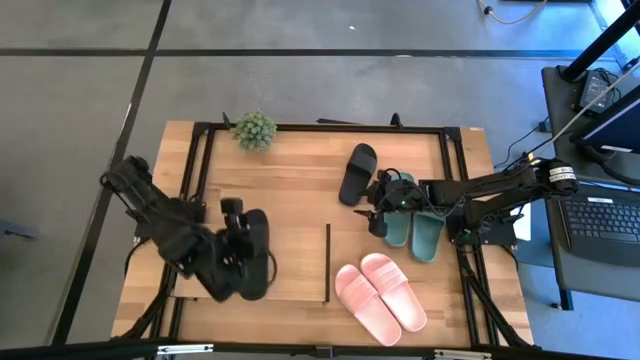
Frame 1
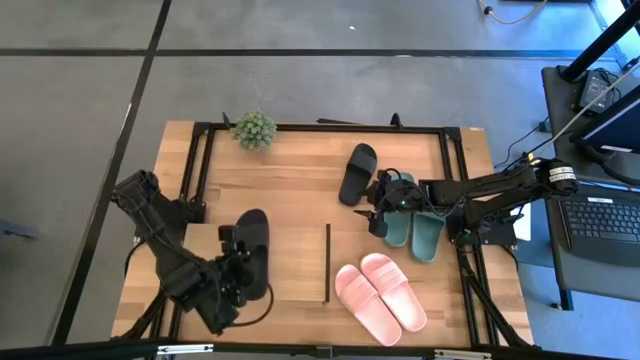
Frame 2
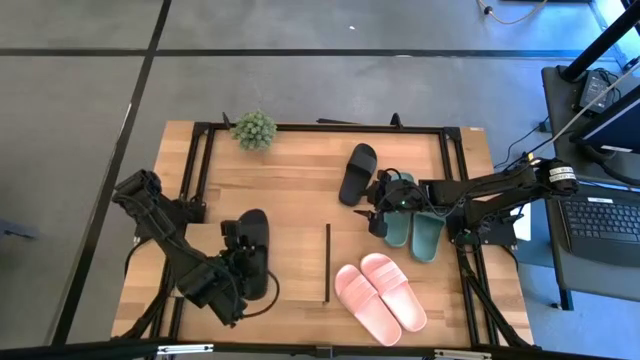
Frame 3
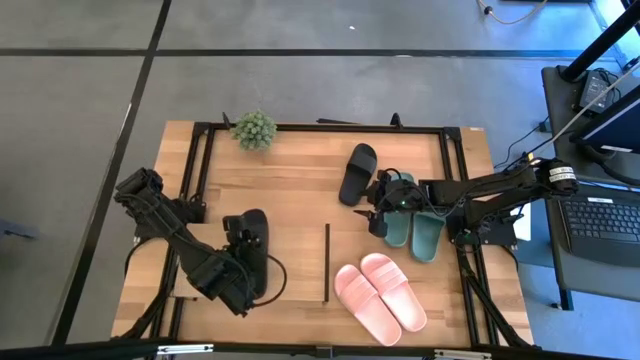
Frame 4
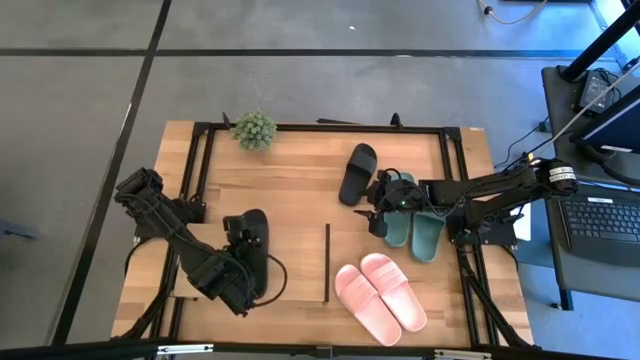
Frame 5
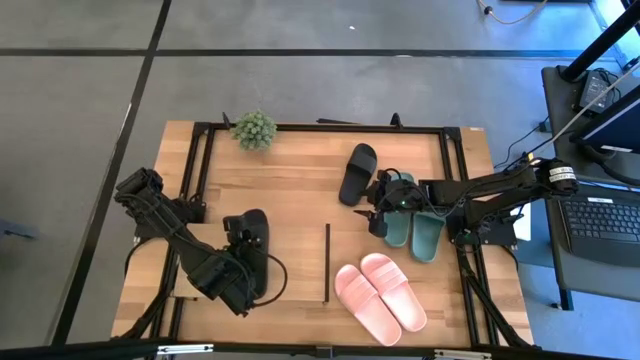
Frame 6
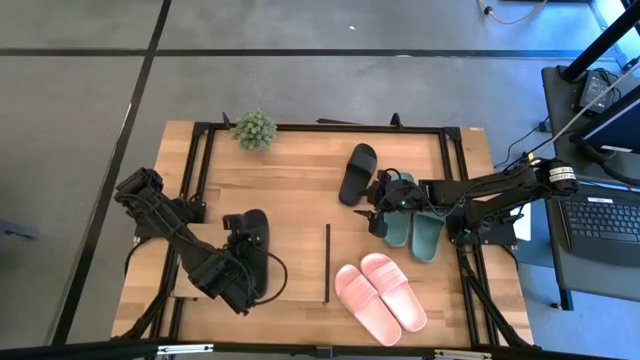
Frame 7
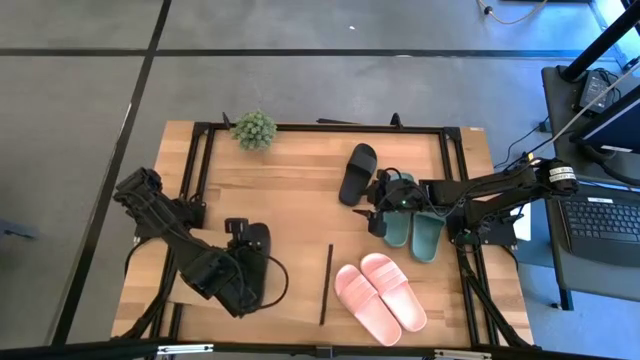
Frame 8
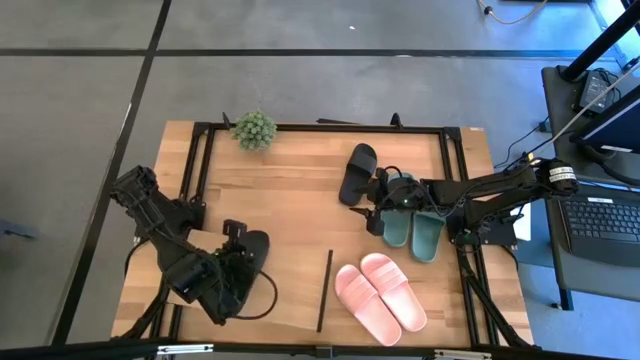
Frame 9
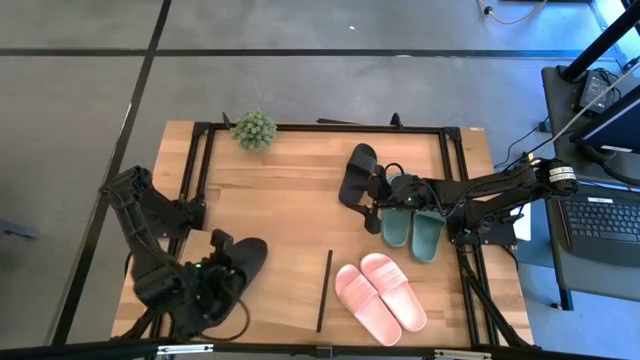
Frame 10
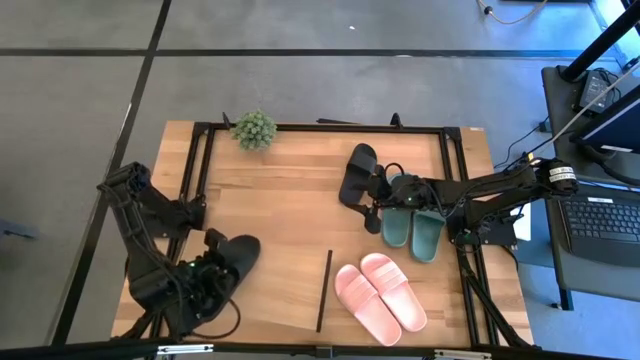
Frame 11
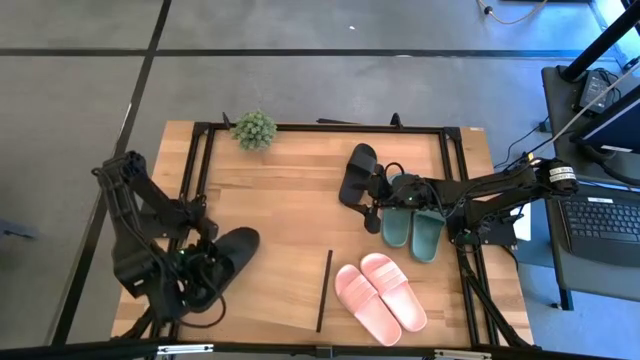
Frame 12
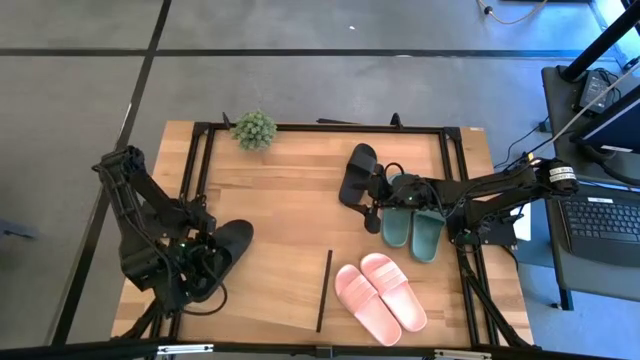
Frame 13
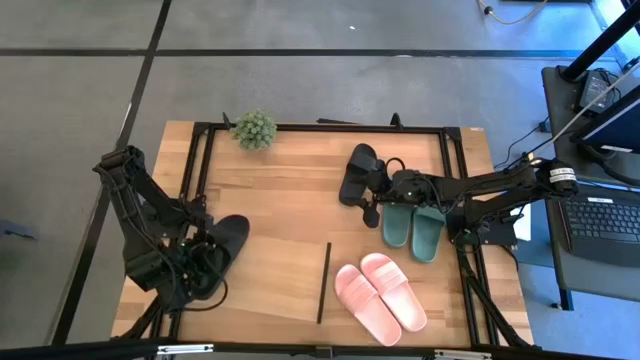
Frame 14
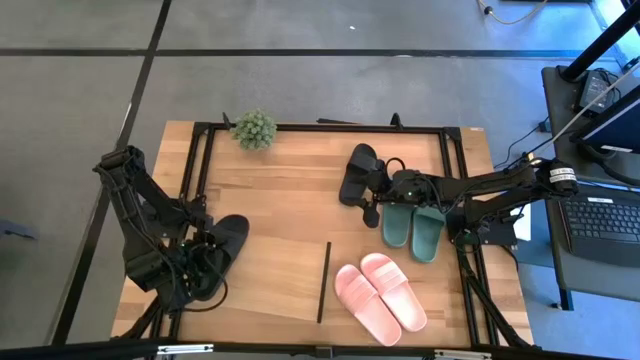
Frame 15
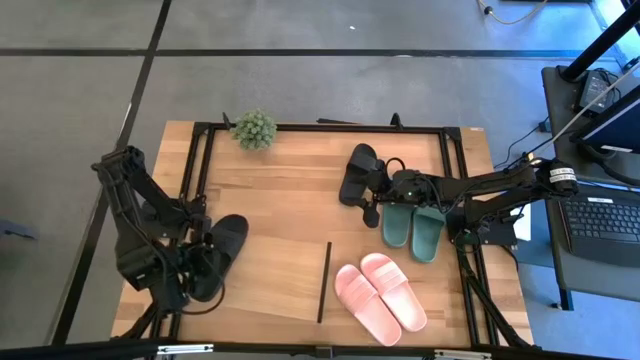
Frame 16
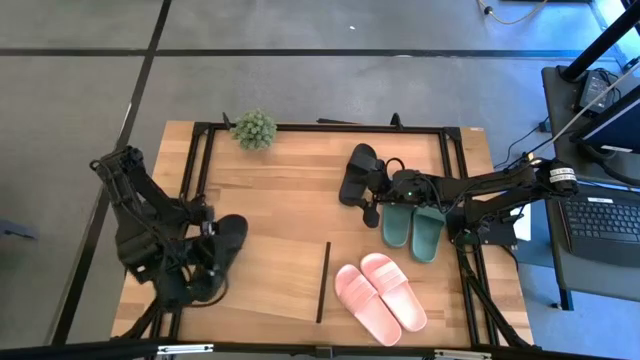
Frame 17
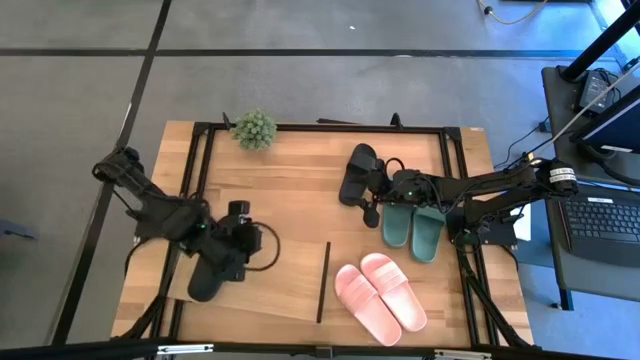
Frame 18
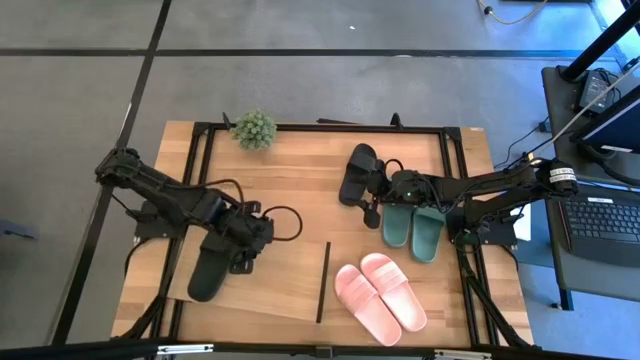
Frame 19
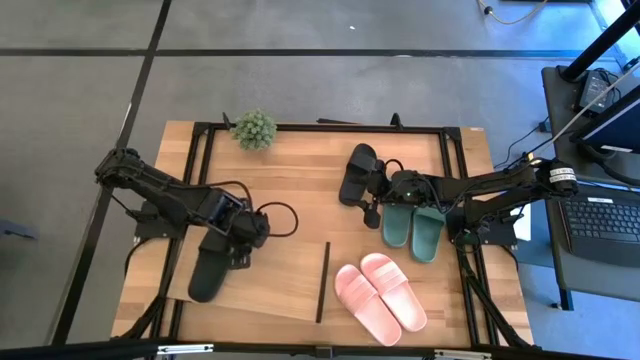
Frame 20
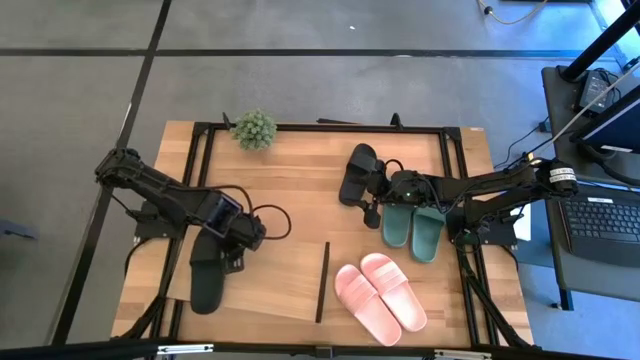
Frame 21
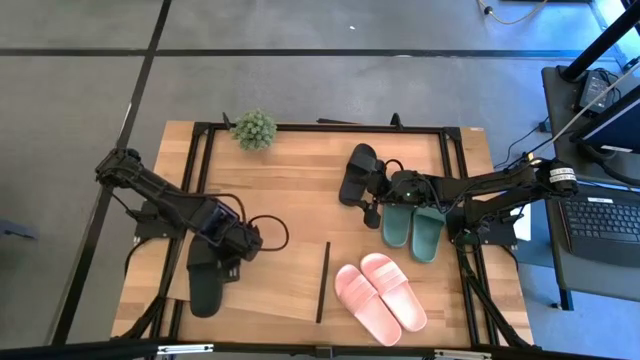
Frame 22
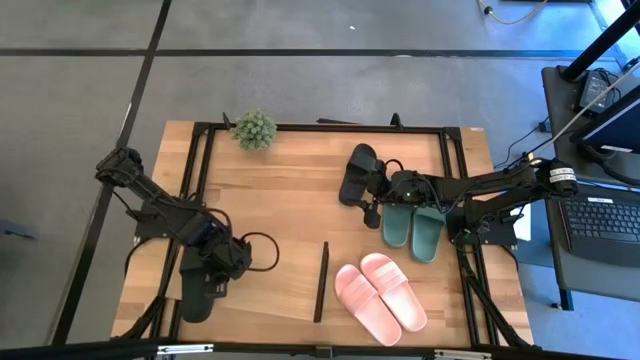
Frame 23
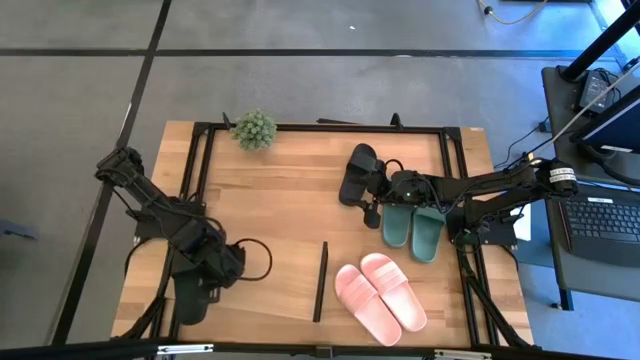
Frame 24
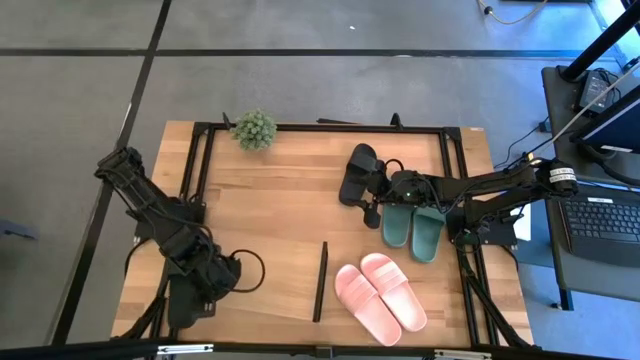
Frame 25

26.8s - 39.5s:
Task: Pick and place slides into the shelf
Put the left black slipper on the shelf

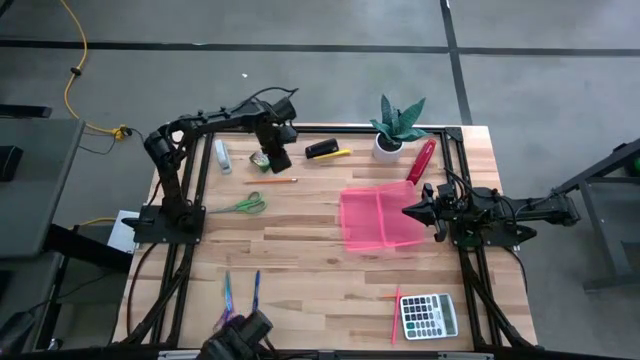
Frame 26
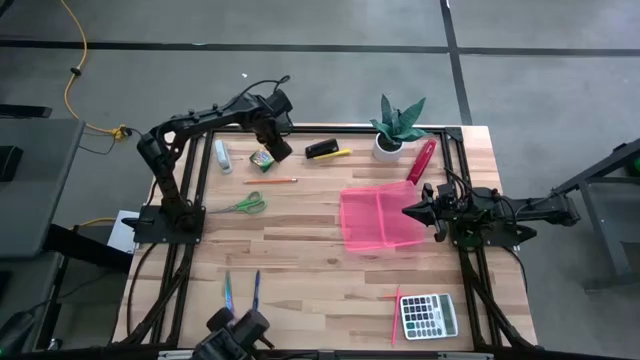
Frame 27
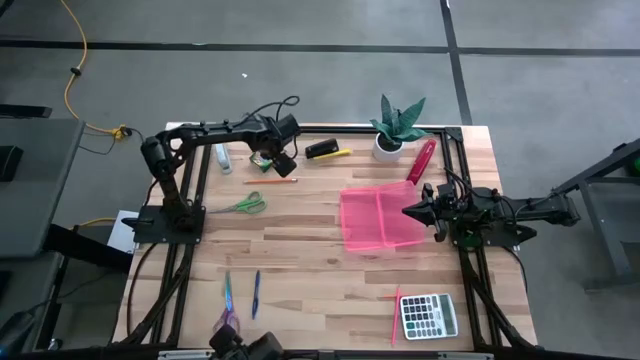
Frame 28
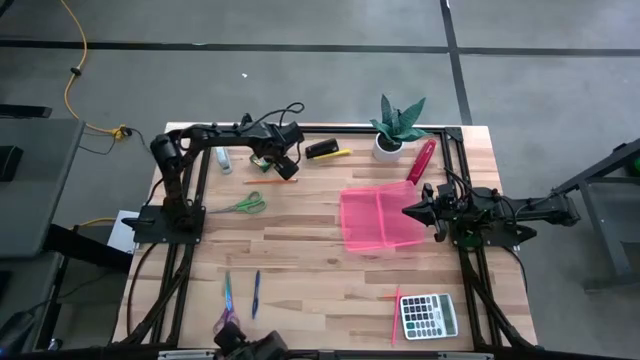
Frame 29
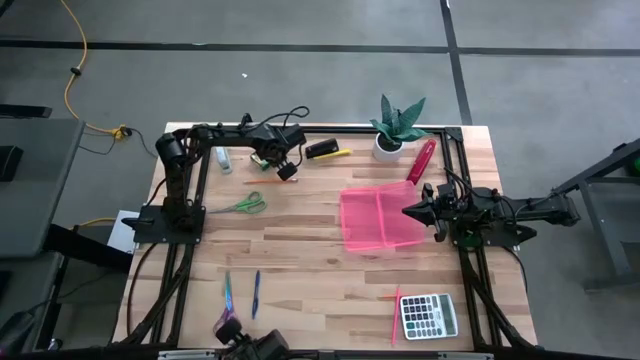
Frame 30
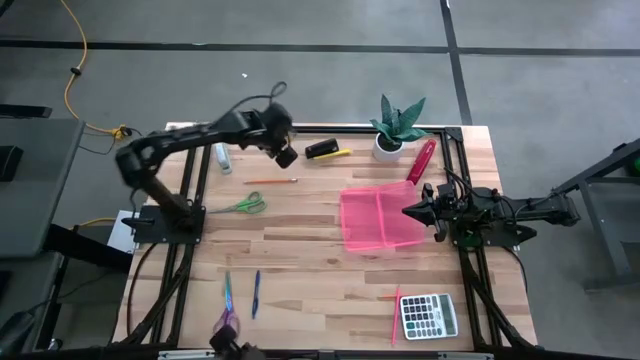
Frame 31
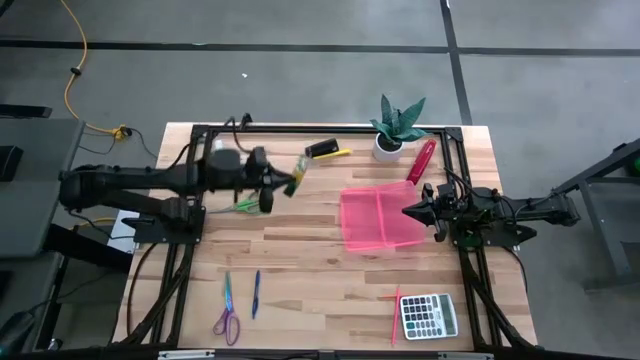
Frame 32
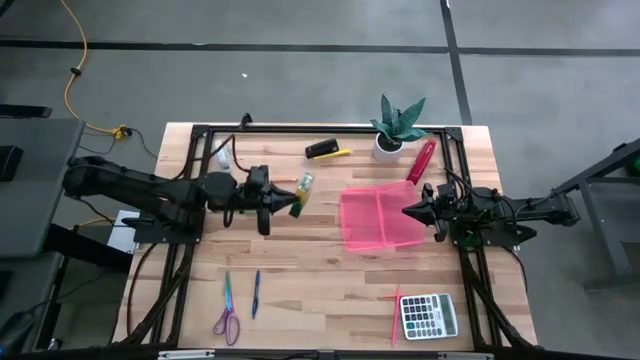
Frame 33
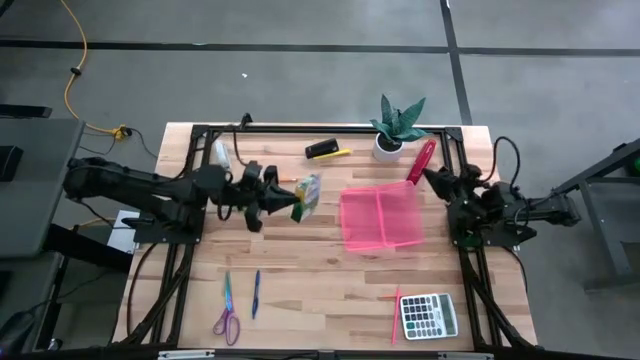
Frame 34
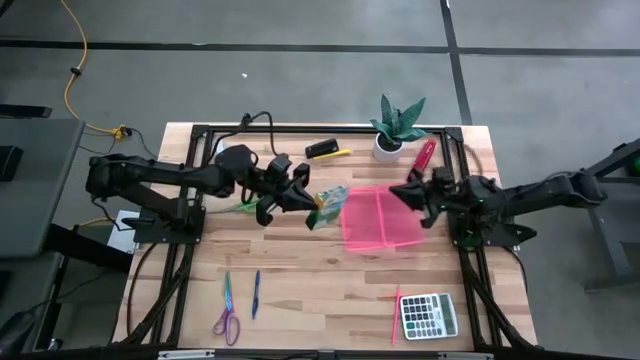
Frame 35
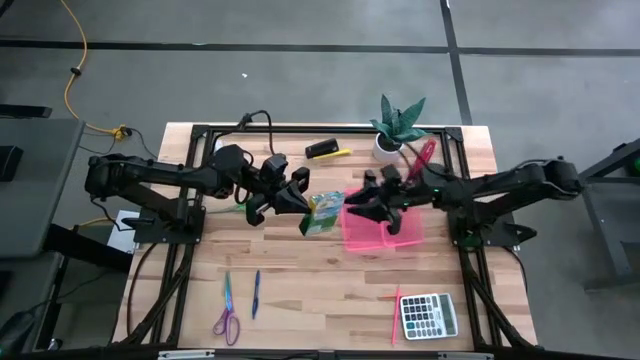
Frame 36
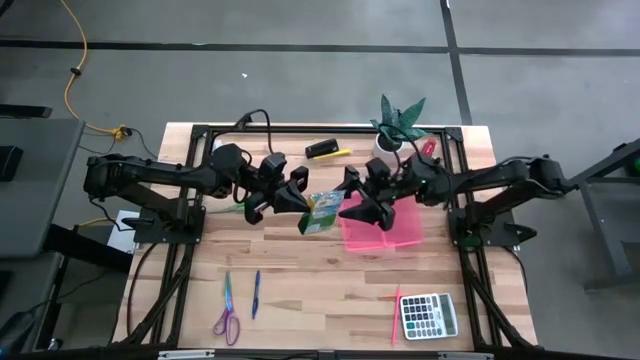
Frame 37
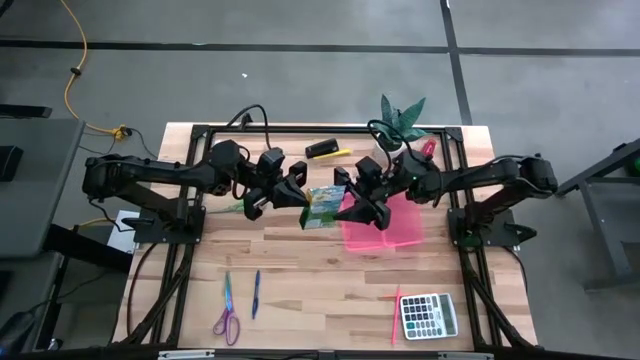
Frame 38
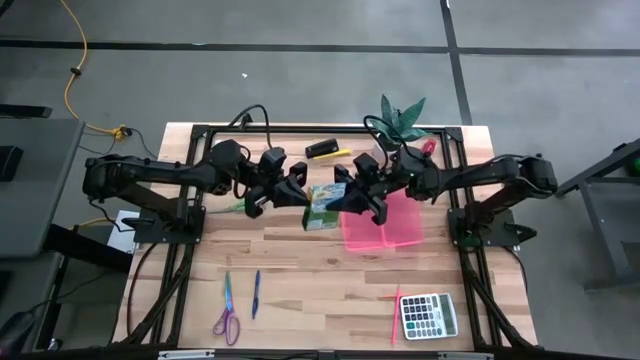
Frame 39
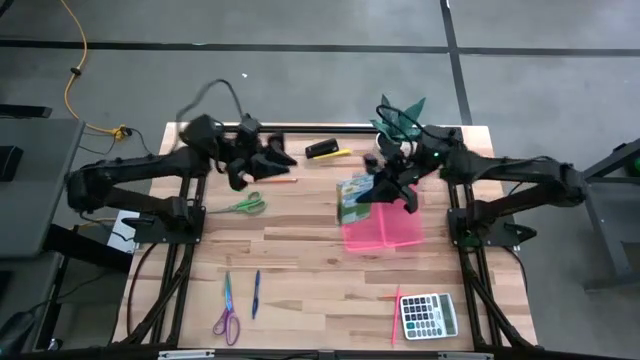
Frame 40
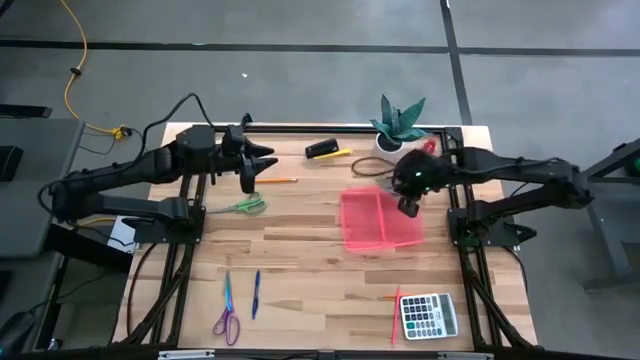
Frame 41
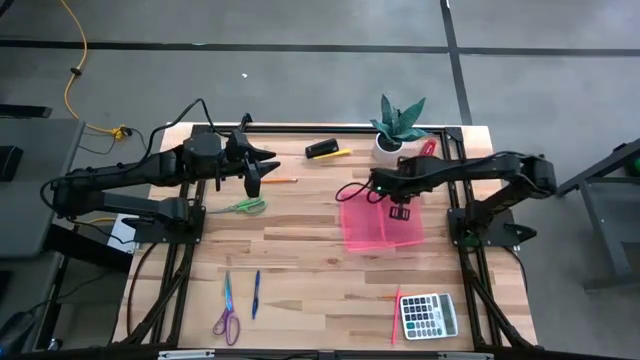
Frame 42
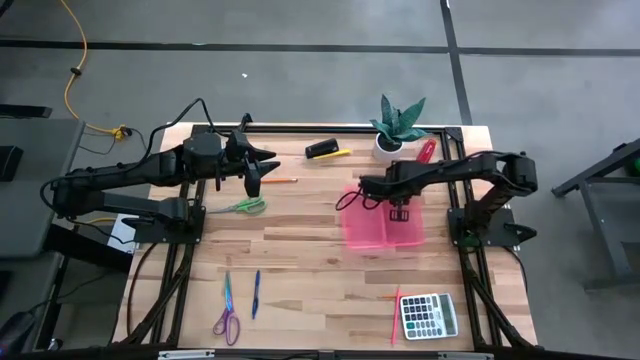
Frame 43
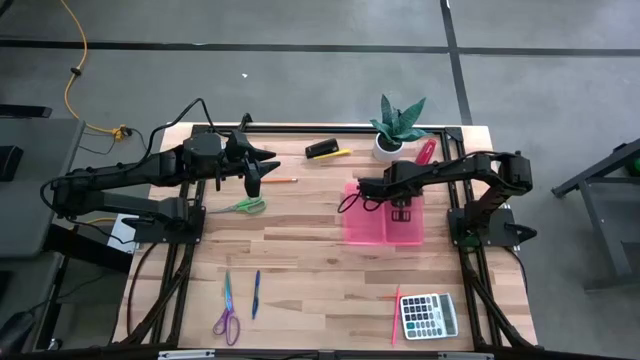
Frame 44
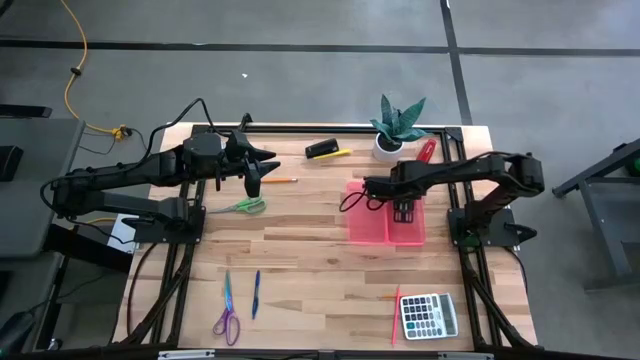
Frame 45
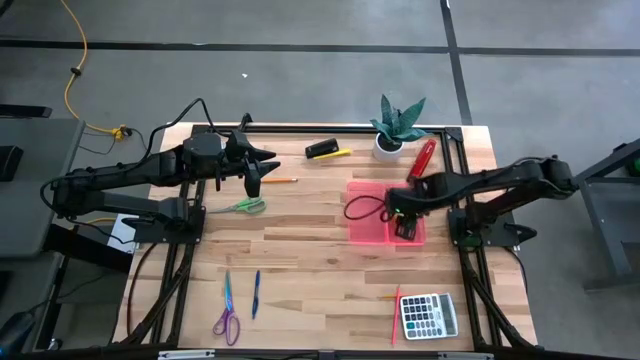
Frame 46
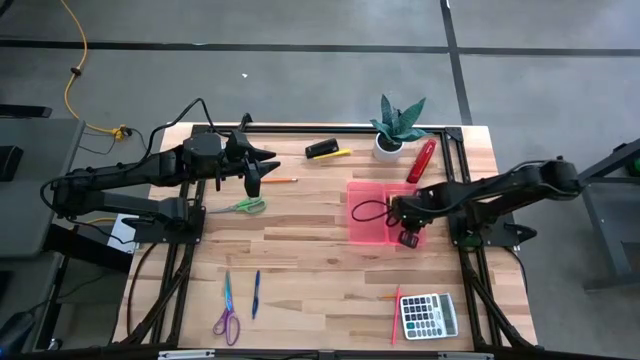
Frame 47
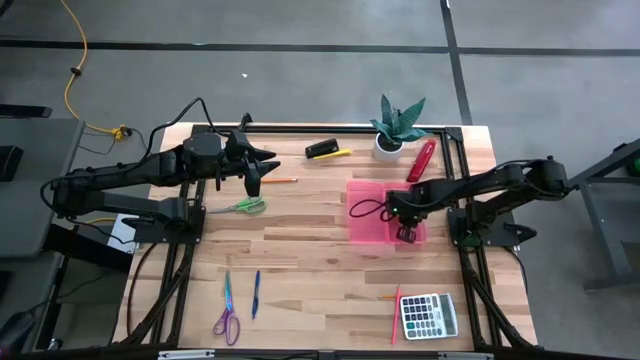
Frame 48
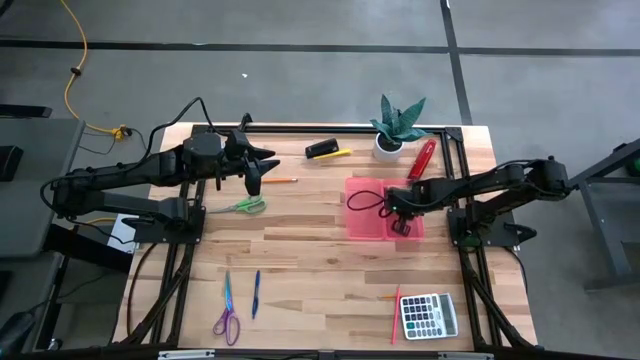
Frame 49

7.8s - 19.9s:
Task: Pack school essentials
Put the orange crayon box into the pink supply box
